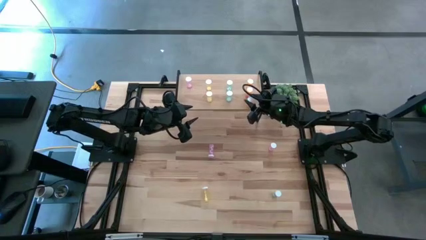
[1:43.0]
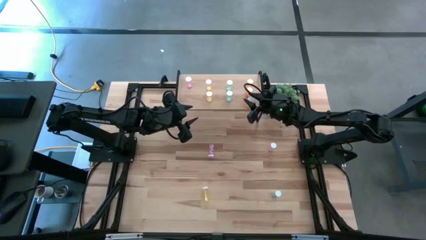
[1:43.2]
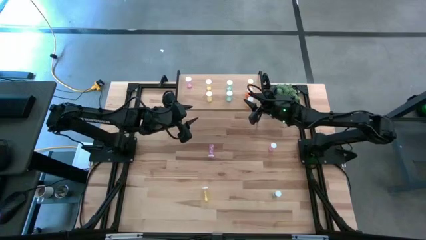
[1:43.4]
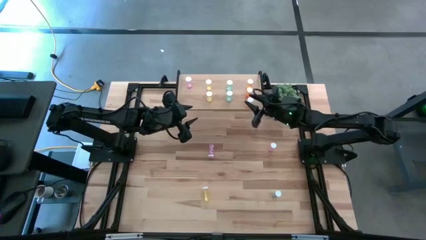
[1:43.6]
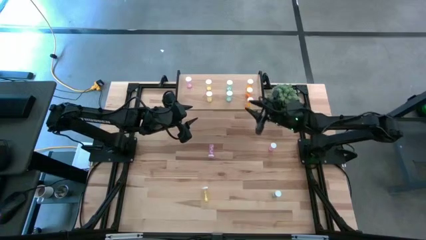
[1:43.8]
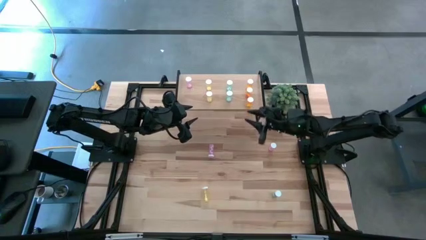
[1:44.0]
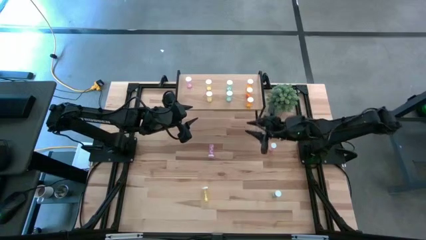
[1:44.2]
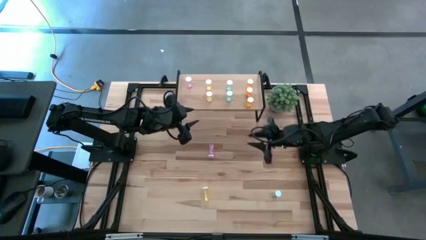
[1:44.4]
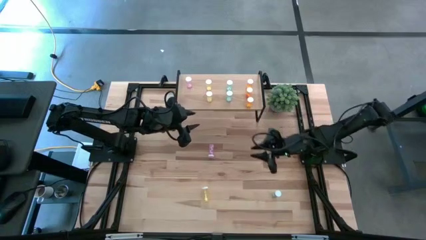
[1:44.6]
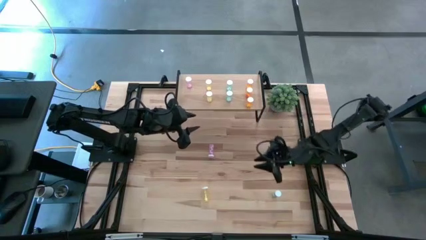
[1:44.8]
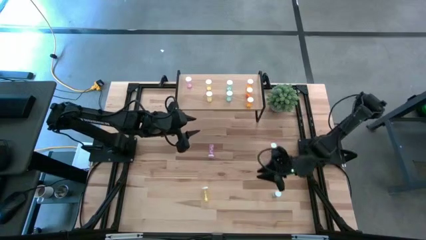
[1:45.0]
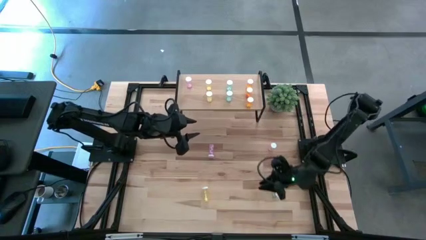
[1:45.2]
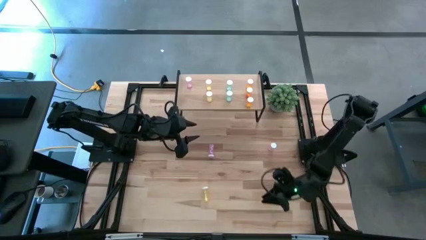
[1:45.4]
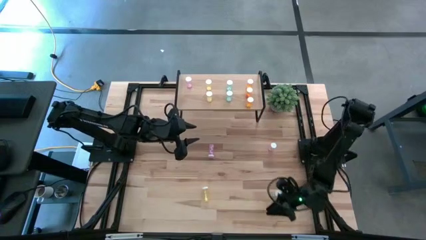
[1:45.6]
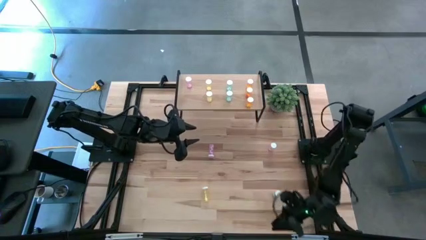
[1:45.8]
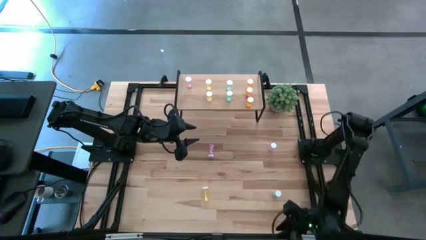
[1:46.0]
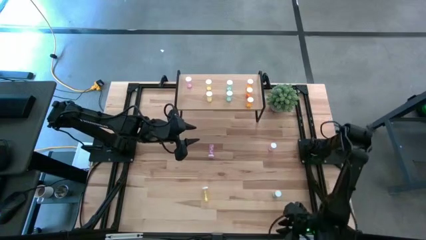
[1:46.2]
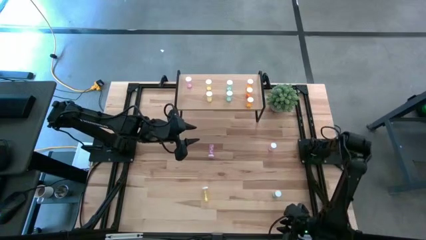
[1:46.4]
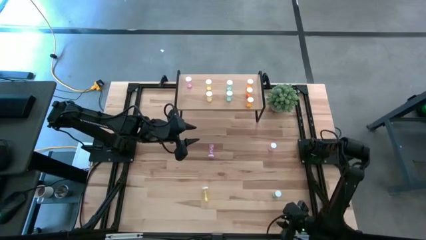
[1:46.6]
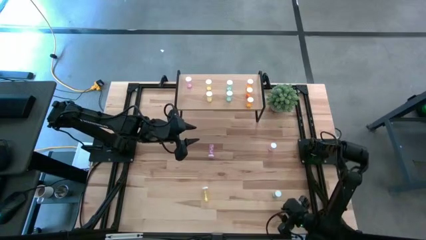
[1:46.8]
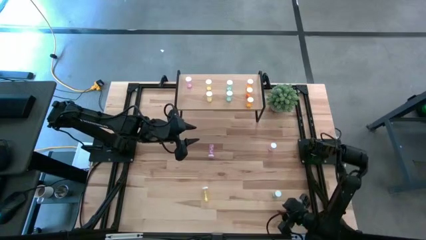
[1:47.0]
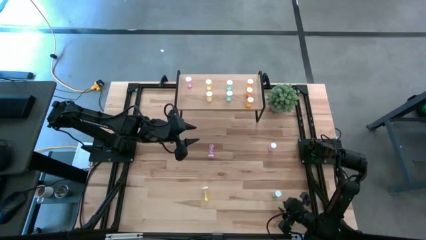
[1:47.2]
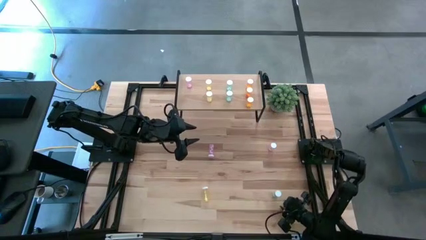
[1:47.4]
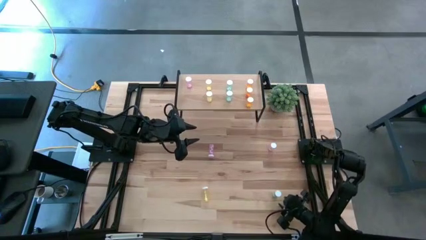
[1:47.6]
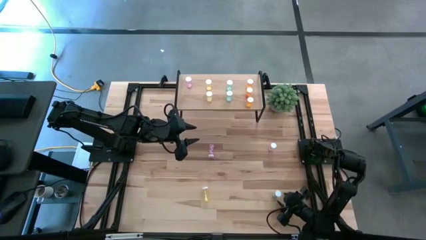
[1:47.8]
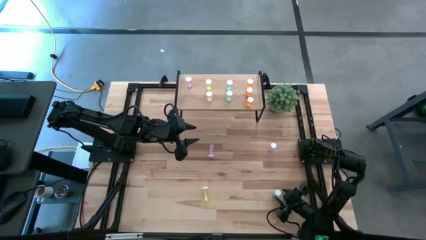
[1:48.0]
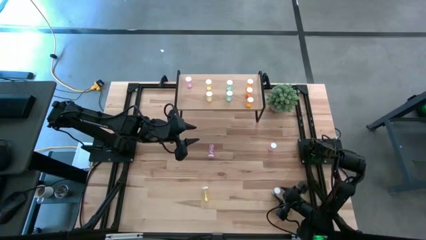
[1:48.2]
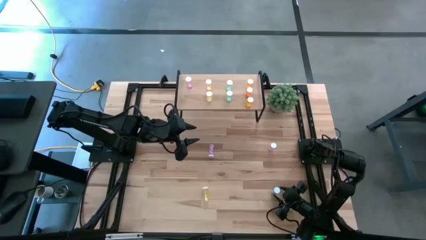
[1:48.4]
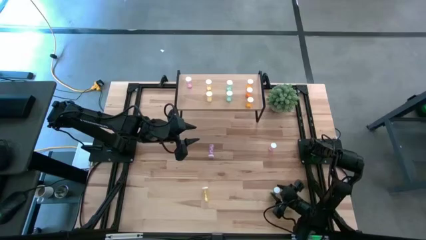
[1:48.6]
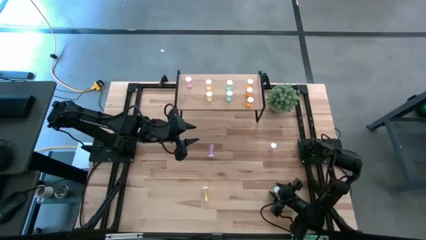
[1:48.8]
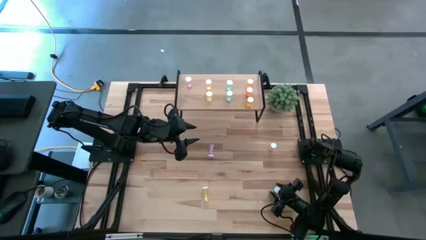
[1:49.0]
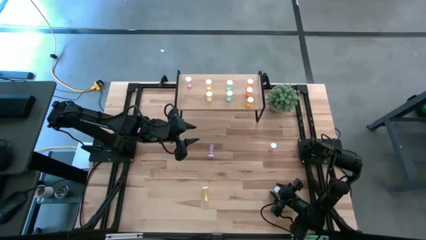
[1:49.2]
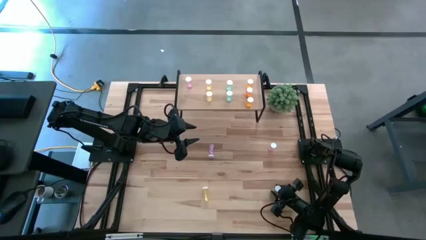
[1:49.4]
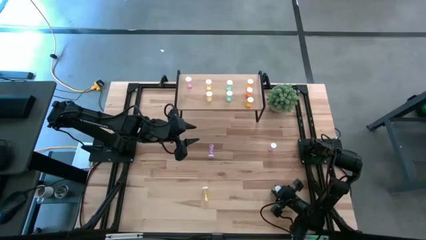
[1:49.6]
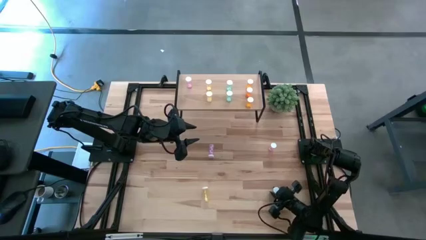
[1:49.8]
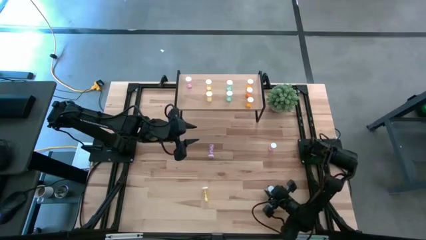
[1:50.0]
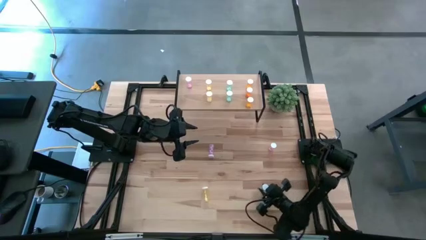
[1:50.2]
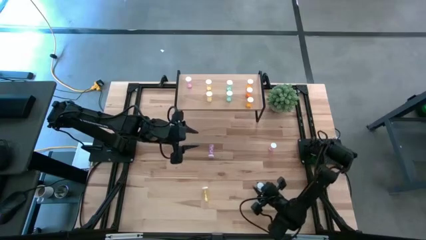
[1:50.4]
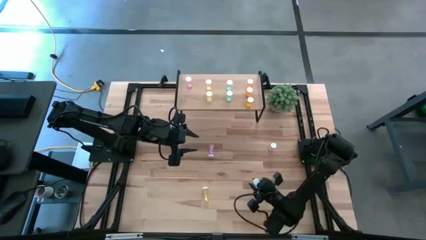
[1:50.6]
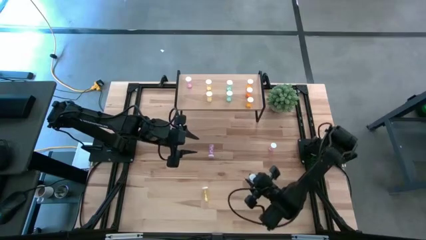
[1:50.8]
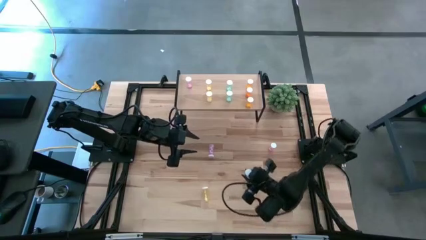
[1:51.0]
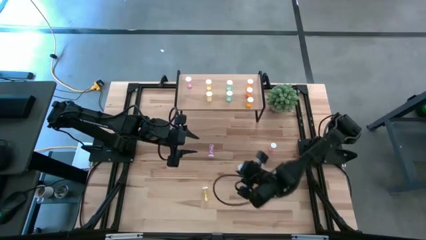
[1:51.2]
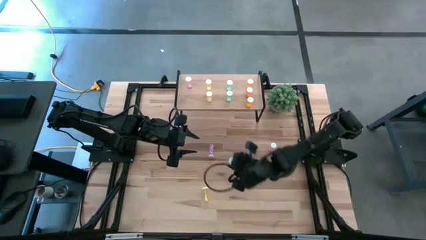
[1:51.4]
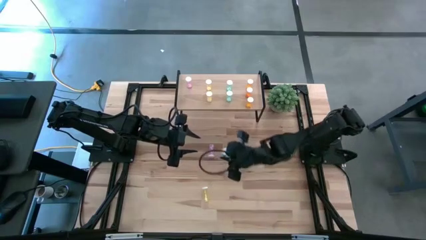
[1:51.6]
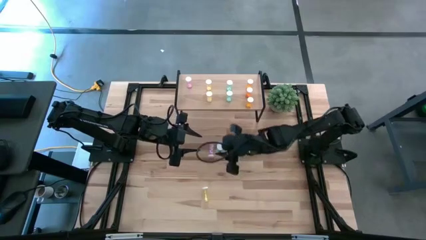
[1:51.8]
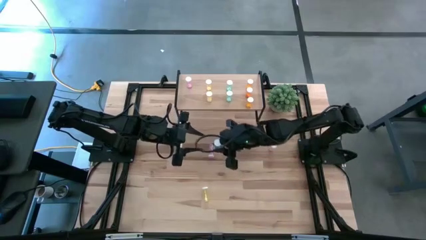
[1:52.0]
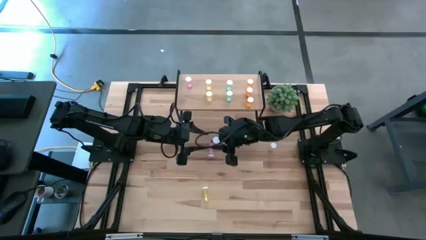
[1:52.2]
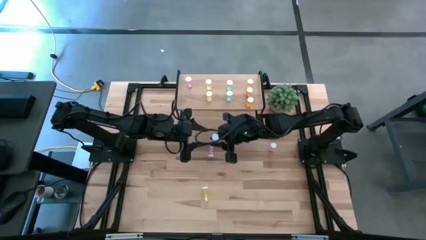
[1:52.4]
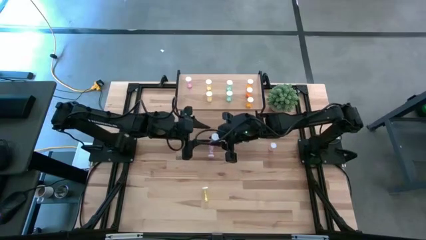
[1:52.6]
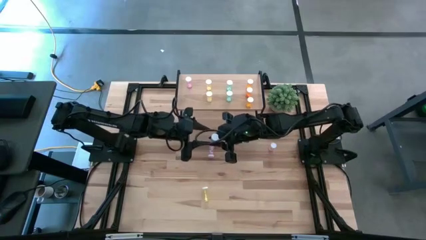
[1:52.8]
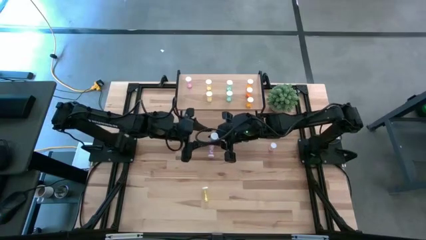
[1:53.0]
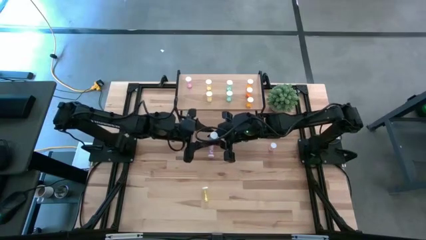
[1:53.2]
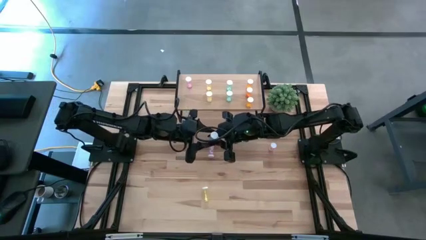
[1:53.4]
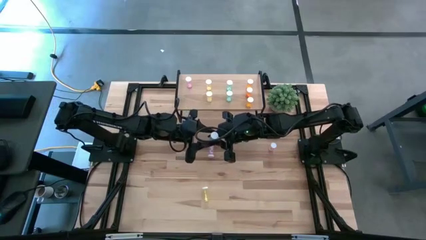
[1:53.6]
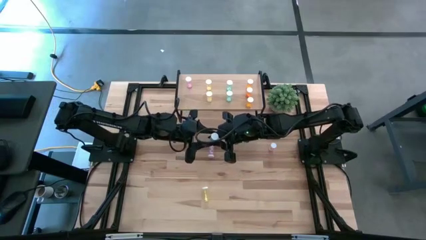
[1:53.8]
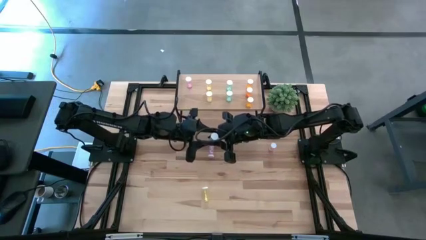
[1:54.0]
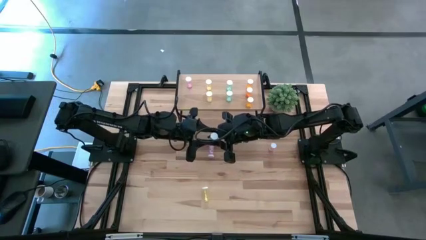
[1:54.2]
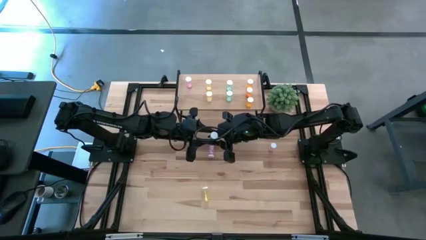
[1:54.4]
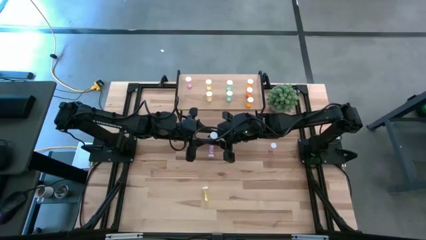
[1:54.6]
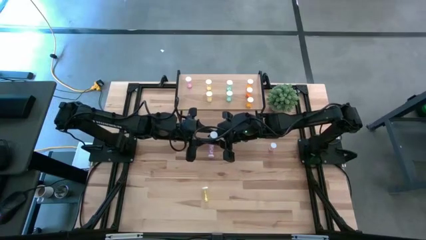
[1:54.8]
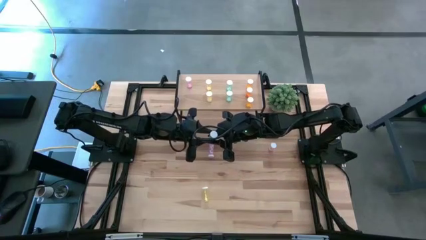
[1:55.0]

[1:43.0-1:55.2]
Task: Pick and place medicine bottles onto shelf by color
Put the blue pill bottle aligned with the other blue pill bottles on the shelf

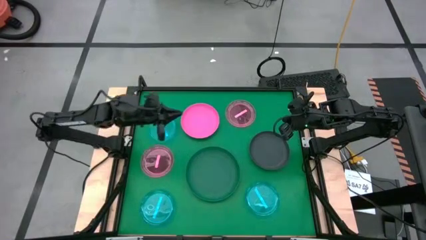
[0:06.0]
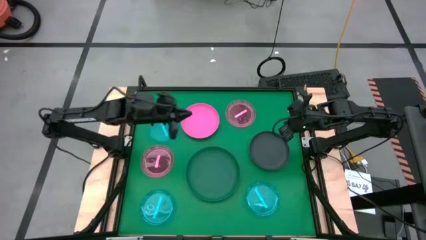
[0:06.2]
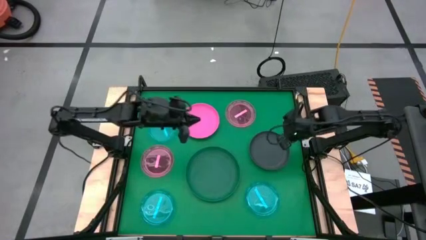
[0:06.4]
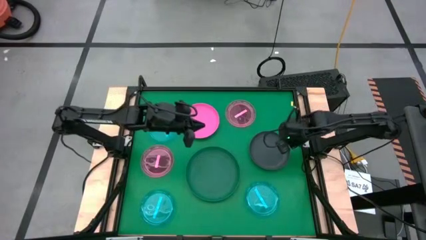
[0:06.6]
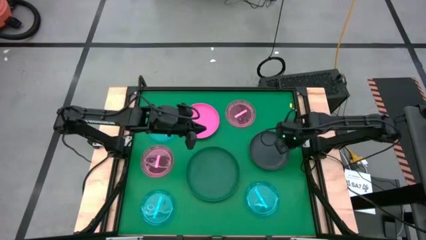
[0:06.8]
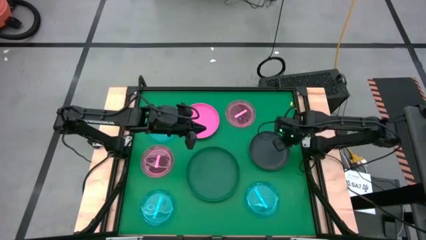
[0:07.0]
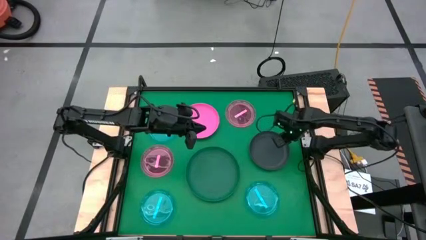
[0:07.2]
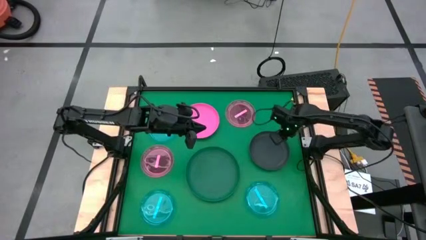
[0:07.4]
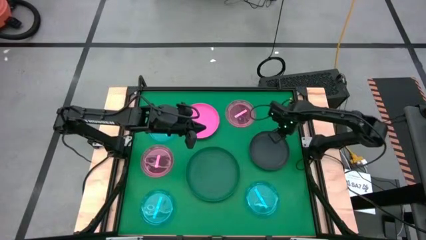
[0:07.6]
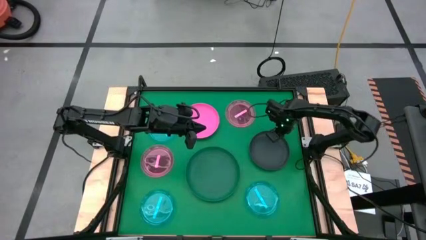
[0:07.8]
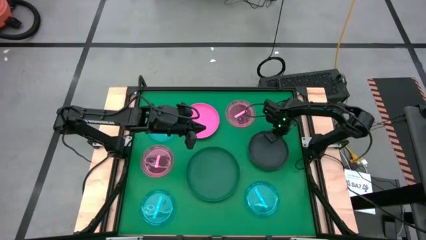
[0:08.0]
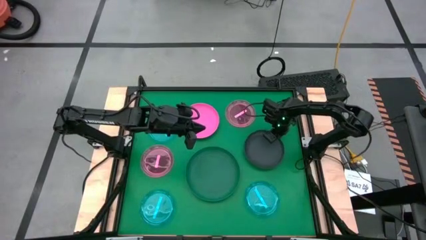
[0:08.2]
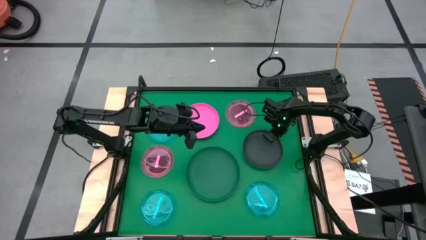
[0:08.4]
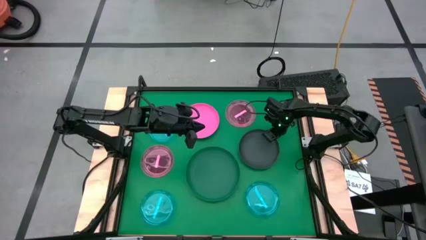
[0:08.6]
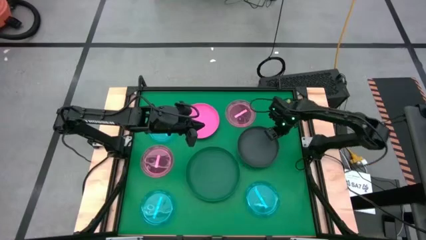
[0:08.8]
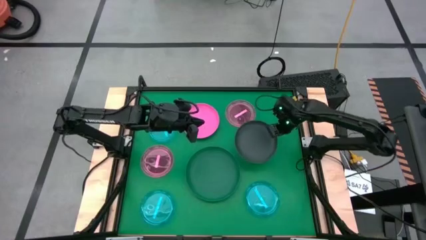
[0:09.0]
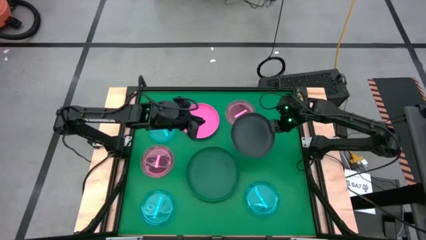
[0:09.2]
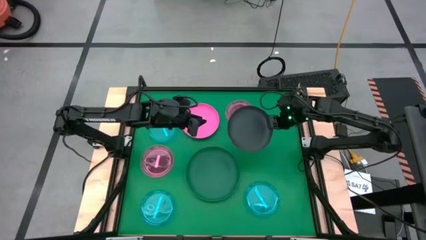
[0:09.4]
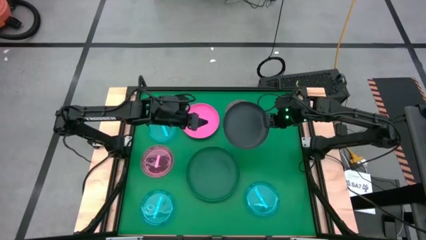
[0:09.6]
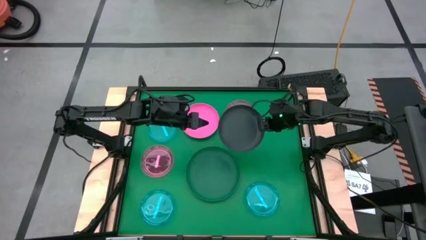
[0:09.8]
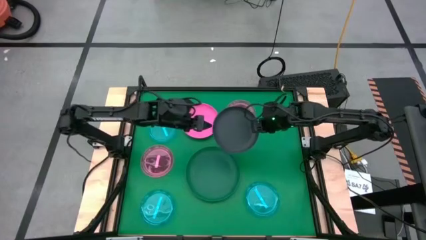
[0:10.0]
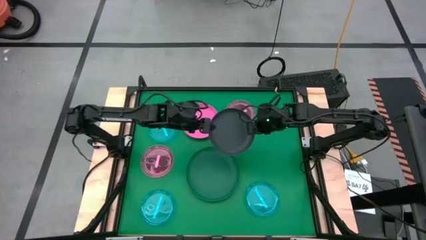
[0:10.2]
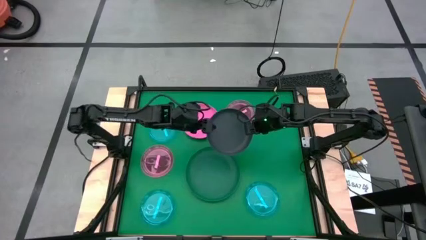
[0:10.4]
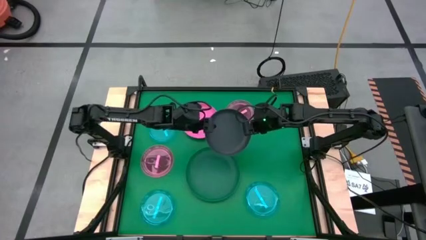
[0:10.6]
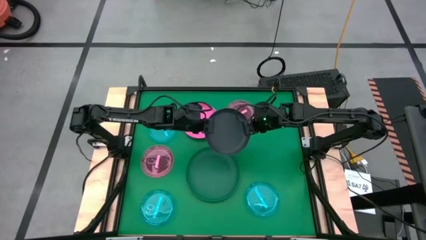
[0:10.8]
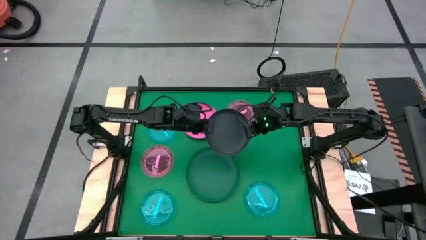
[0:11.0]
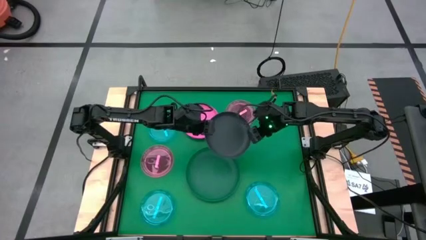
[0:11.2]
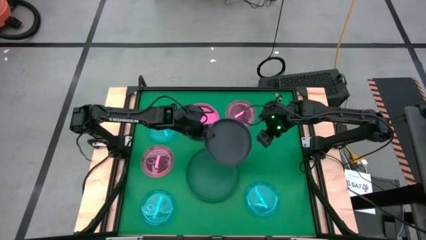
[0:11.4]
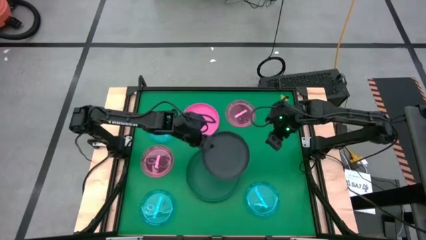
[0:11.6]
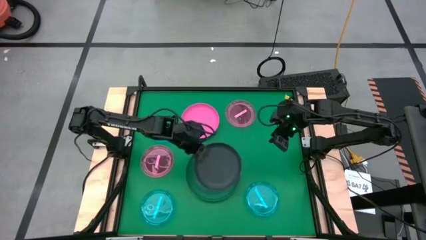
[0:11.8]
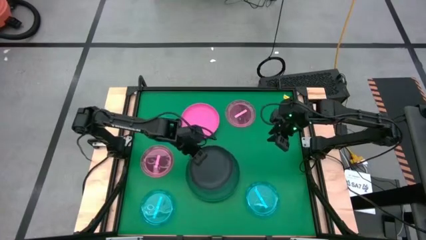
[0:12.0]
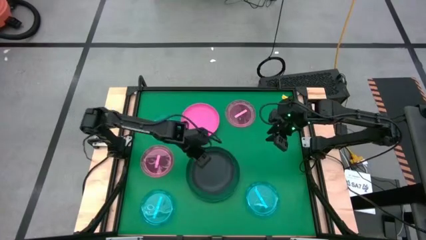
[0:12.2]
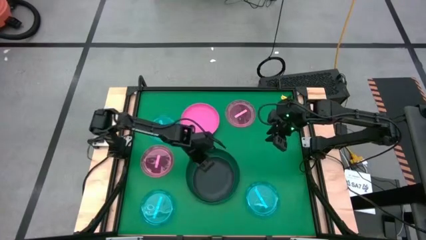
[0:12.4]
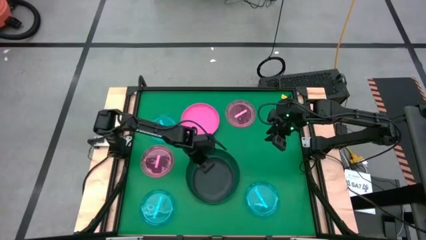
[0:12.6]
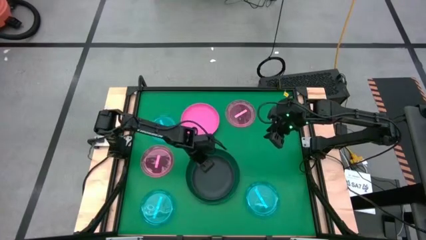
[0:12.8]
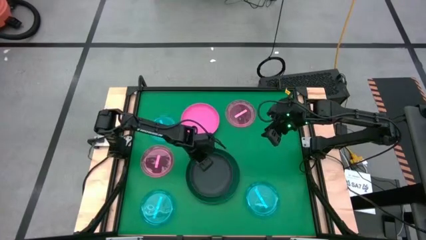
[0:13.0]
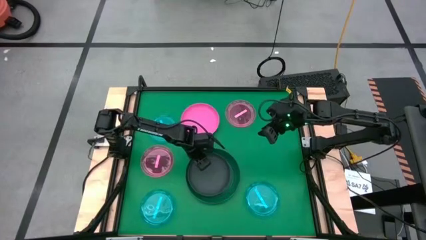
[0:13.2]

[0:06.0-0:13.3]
Task: Stack plastic plates
Stack the black plate on top of the green plate
